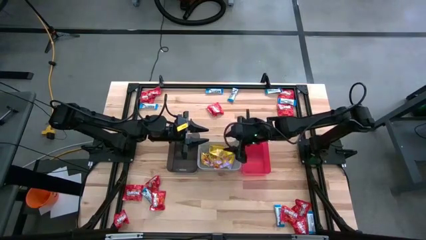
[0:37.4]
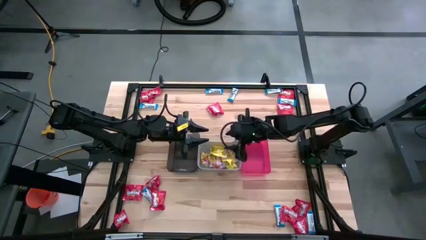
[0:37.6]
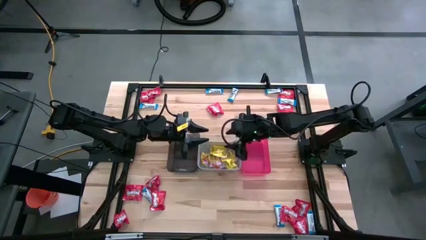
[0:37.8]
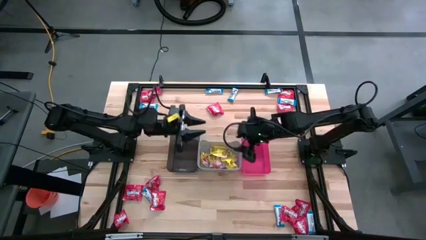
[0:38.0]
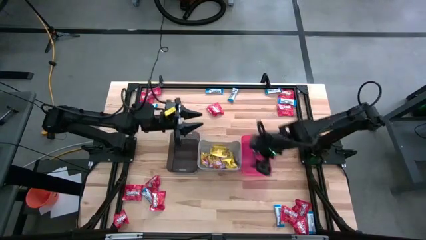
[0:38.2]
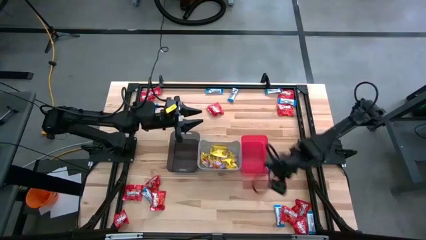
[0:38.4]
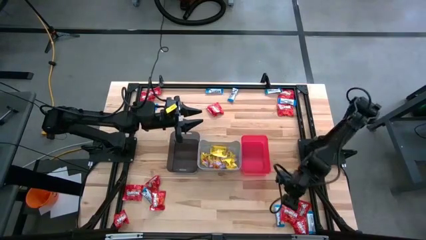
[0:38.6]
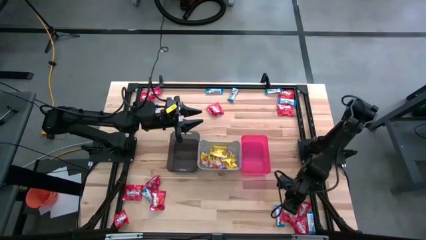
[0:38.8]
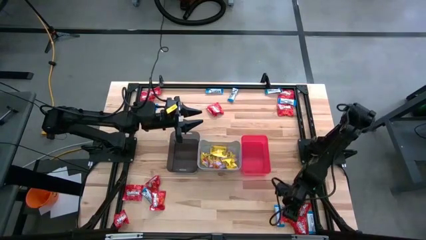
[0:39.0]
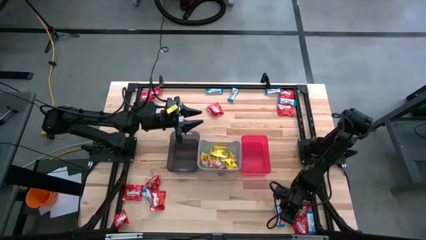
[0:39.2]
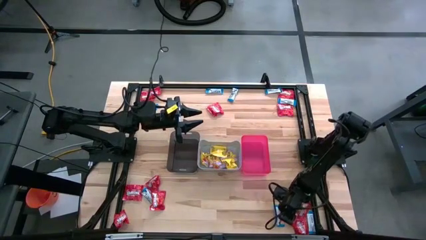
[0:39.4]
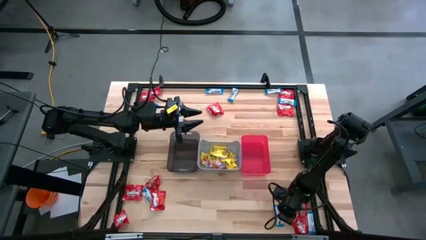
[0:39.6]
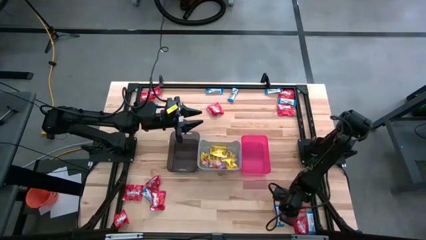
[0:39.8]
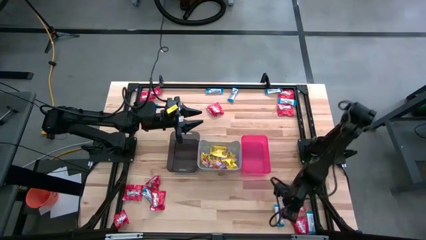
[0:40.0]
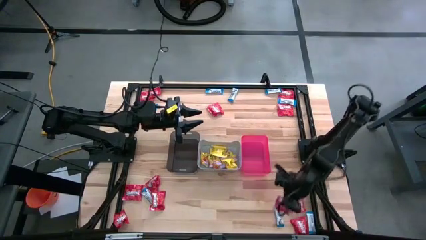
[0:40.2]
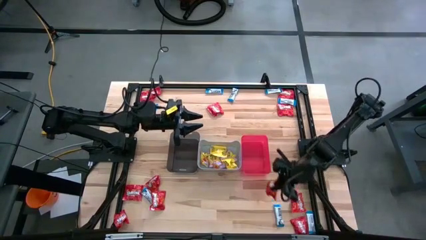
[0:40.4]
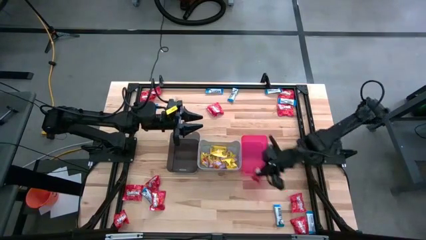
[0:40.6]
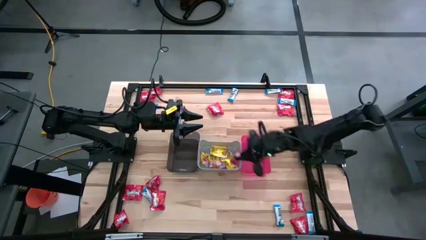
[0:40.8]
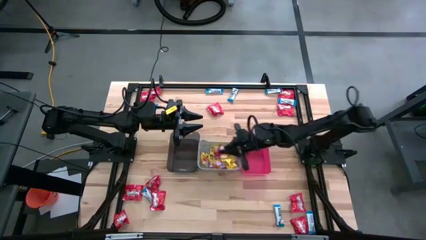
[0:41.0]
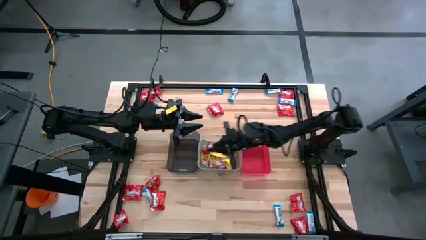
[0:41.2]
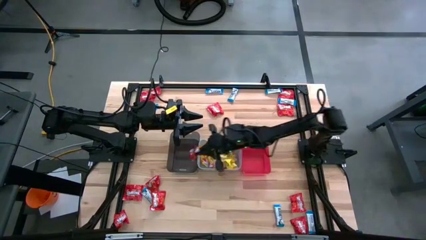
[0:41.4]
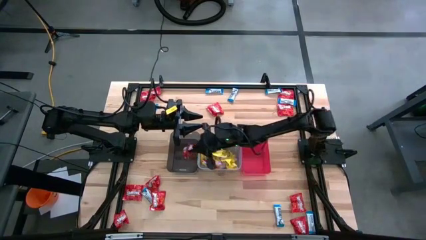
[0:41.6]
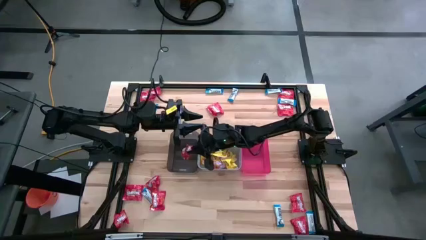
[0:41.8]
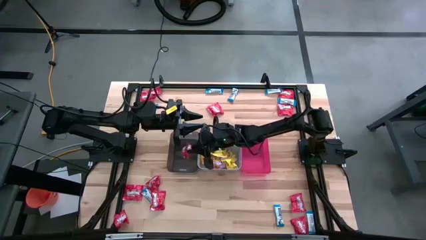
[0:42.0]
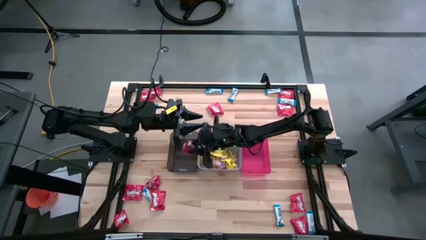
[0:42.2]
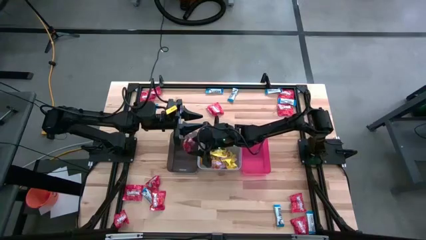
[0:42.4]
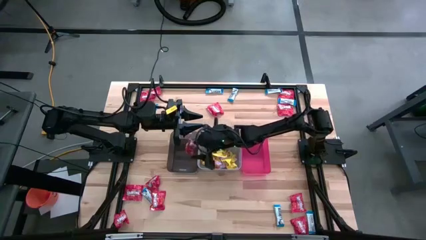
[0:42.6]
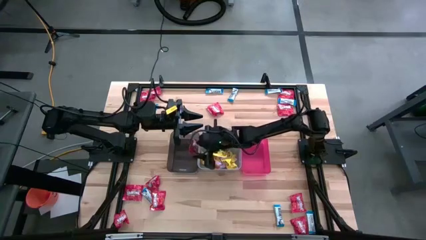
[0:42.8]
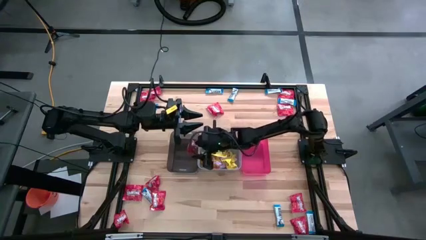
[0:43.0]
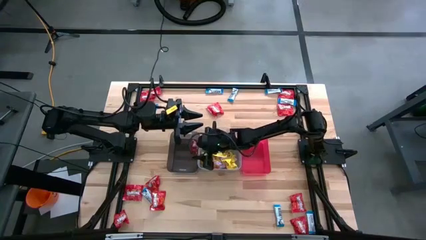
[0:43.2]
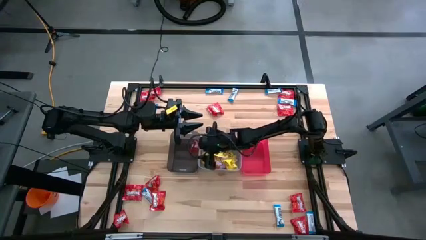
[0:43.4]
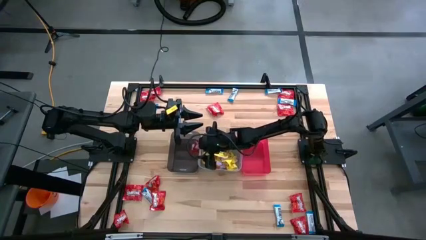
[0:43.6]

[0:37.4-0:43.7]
Task: Sort candy
Put the red candy into the black bin

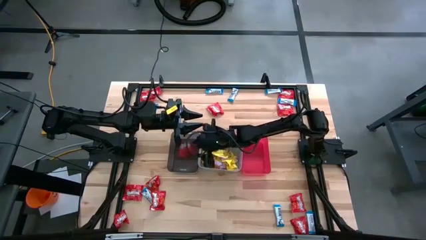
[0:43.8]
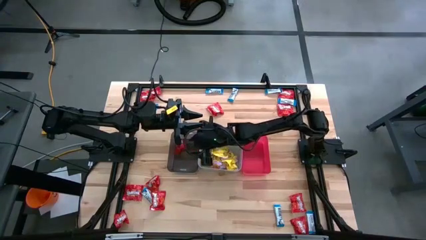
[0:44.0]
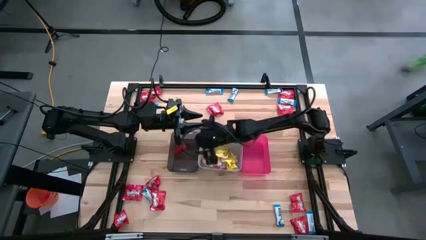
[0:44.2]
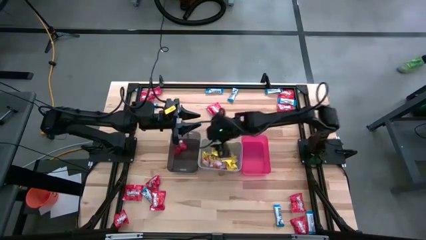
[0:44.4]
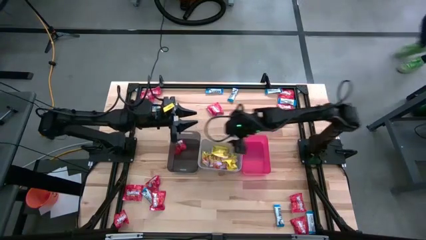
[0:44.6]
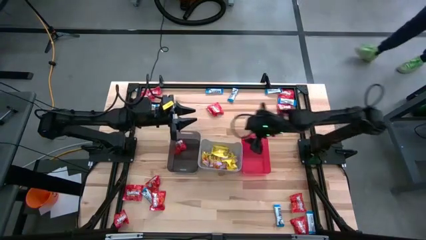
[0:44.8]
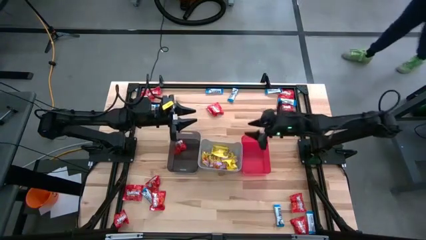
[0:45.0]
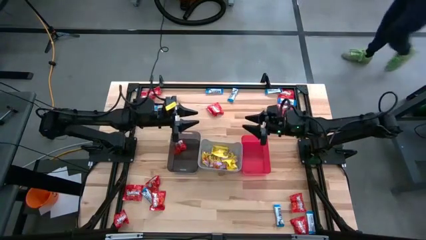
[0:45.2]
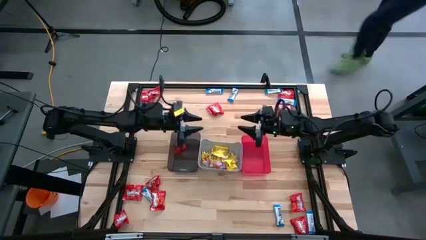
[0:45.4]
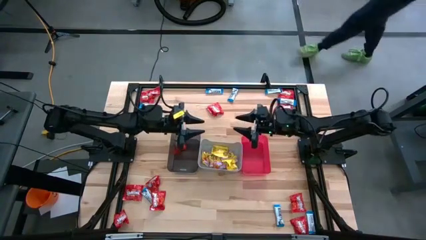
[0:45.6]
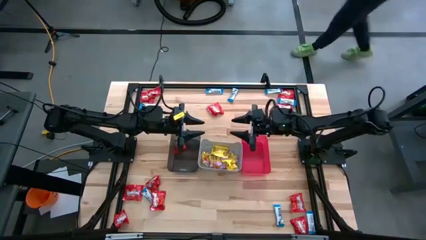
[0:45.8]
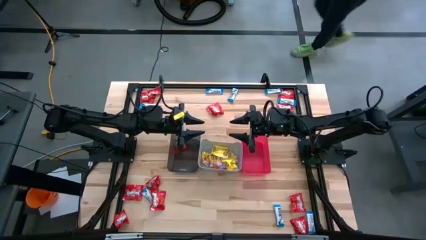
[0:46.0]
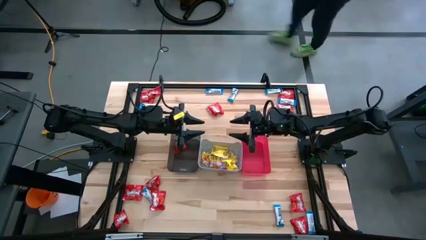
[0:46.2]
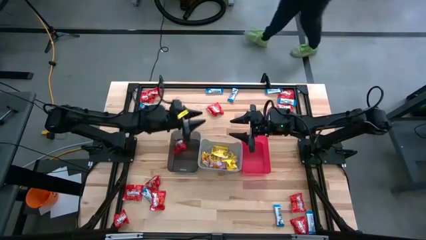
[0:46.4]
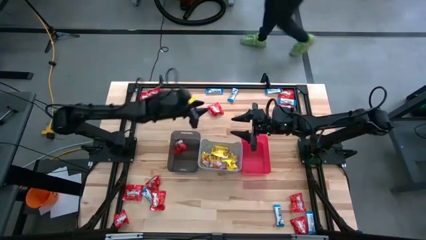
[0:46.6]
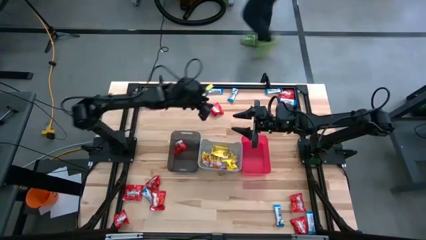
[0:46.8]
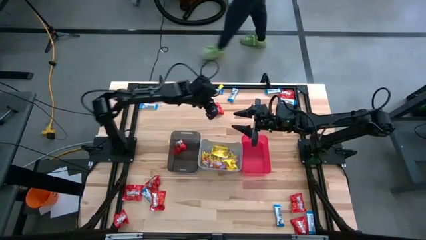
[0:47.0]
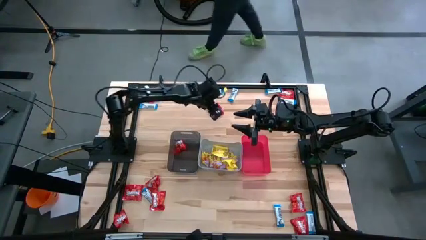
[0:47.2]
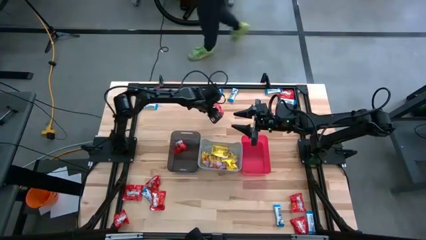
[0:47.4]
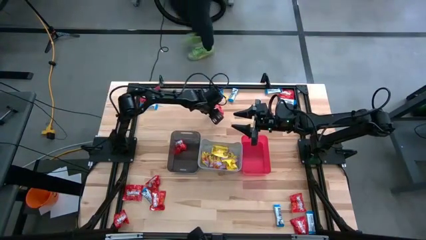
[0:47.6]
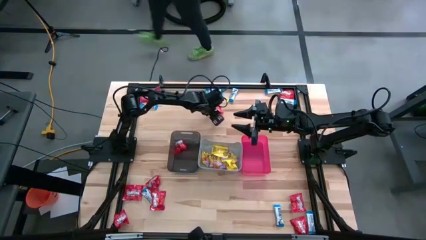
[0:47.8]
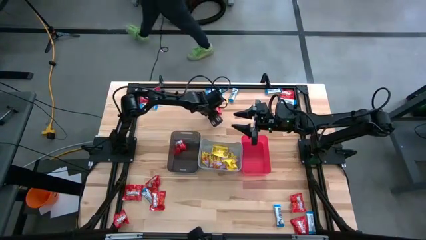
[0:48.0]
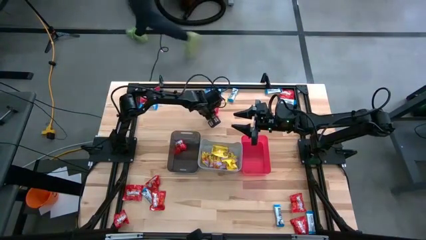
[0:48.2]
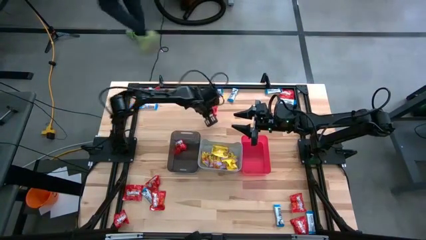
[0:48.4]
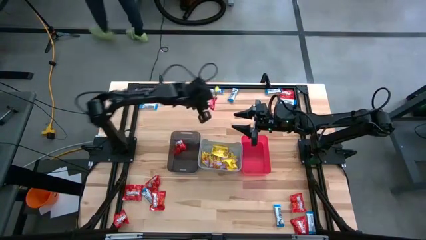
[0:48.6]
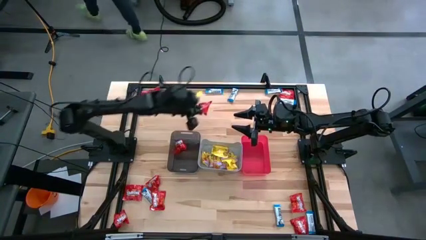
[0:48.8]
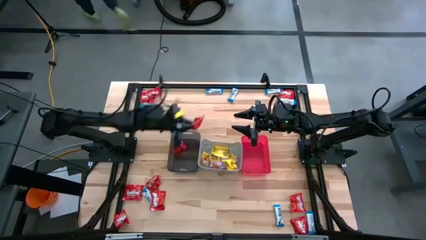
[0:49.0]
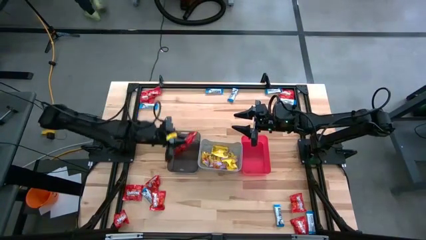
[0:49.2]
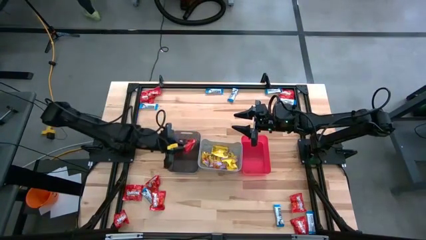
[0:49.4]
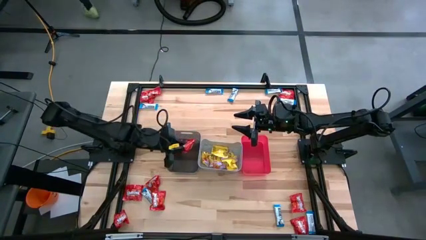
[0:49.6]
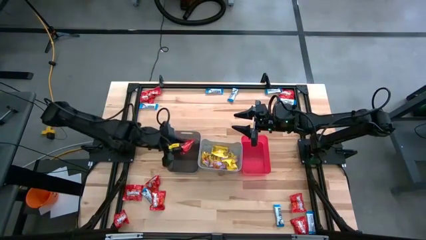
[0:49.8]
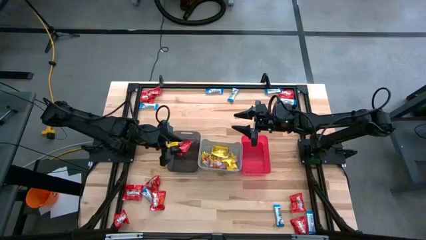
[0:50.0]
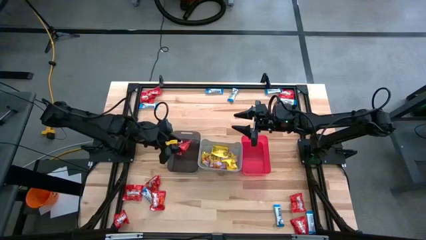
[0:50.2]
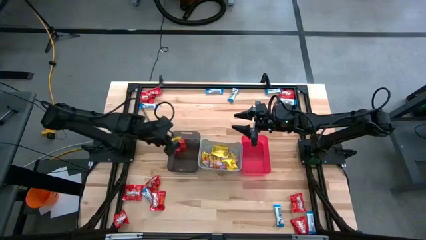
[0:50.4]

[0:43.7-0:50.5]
Put the red candy into the black bin

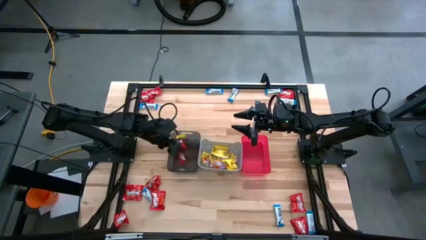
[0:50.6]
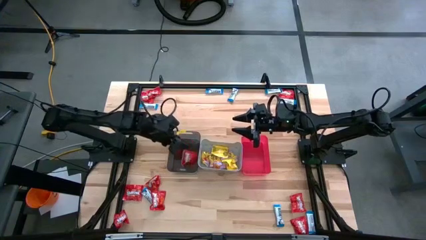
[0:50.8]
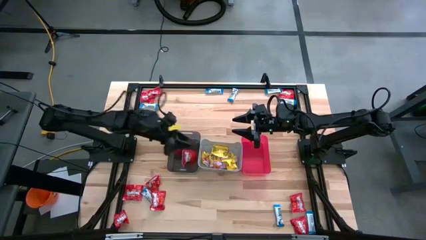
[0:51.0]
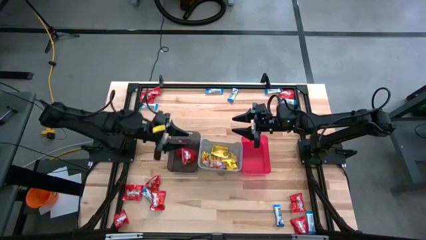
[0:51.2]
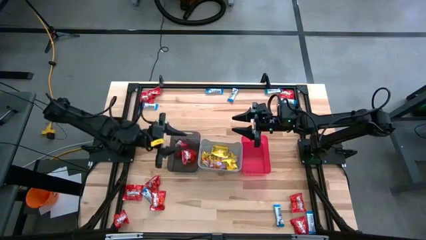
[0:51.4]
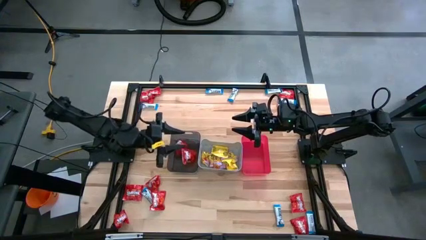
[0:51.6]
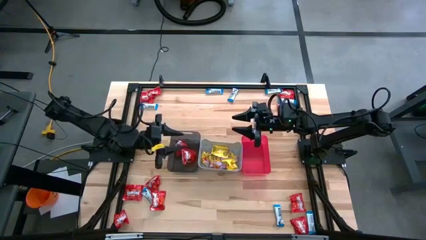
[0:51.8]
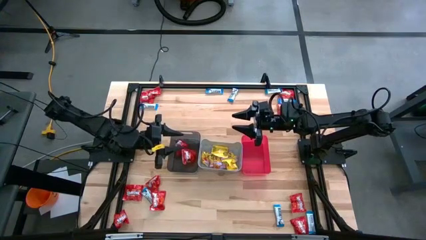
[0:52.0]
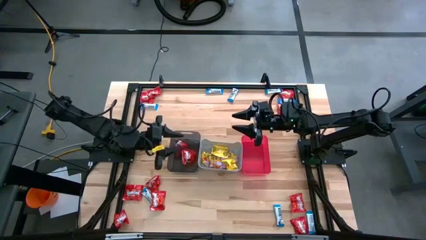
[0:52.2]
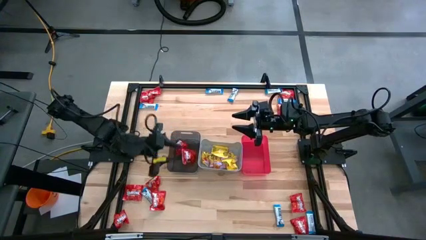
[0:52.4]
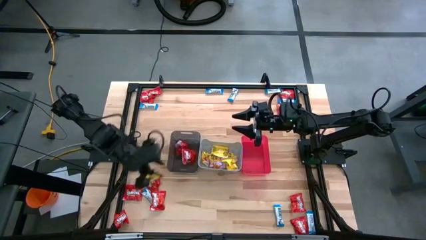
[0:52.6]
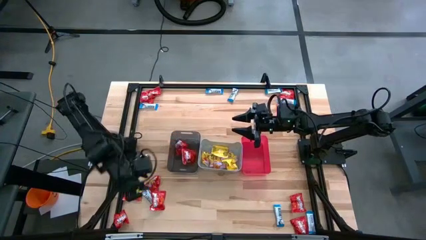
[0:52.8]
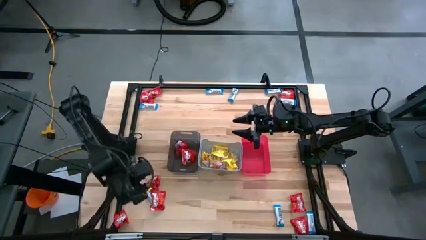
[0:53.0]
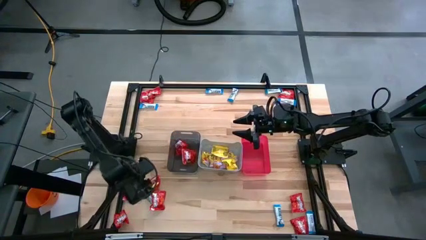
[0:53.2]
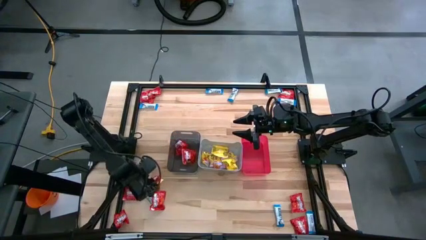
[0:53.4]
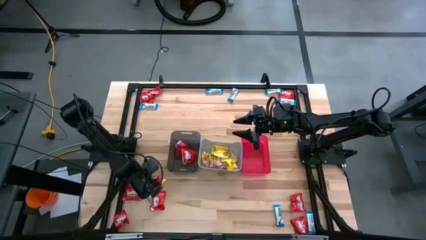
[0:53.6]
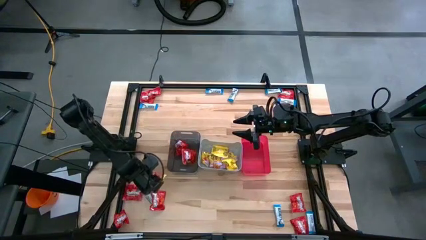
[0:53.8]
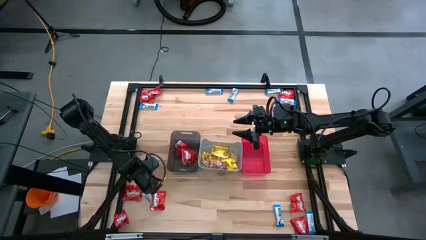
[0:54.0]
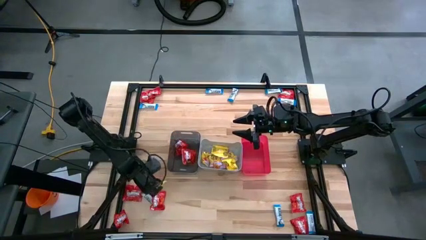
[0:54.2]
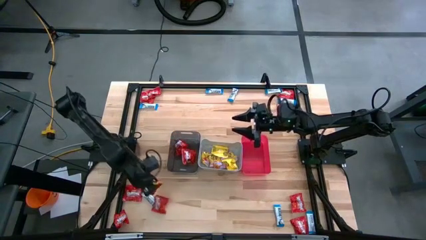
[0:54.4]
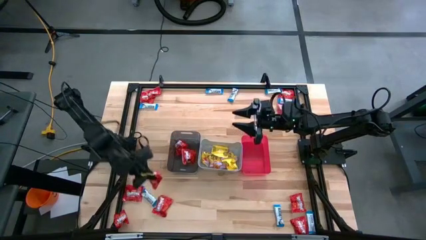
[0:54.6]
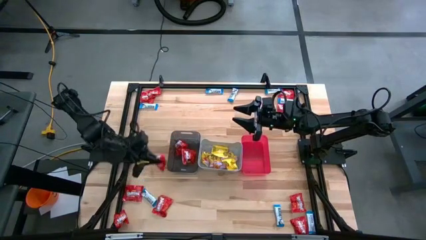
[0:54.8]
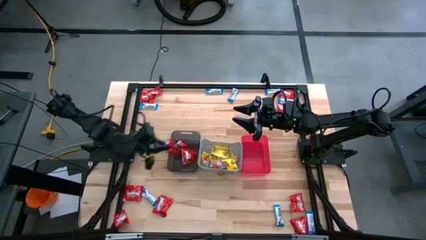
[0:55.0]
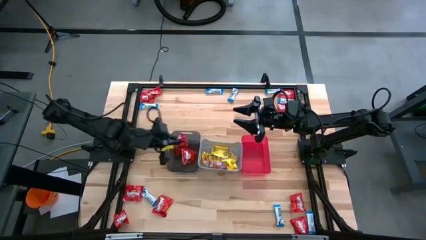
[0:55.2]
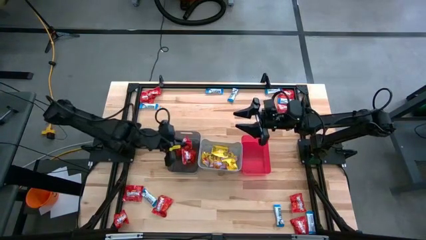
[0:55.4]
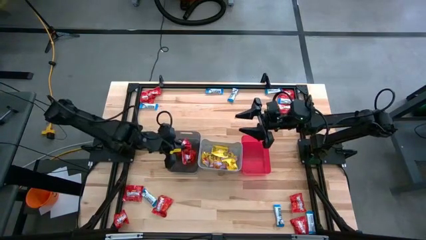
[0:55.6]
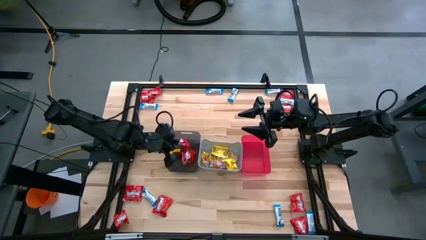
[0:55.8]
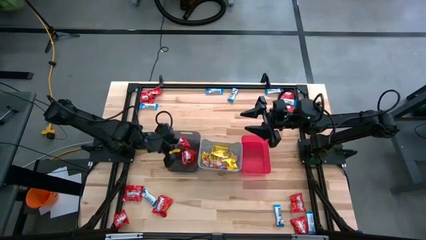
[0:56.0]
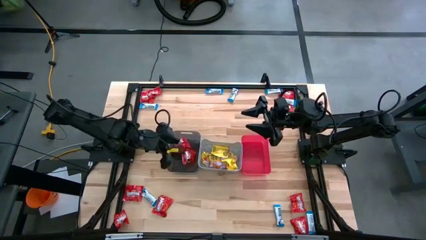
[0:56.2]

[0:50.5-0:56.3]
Put the red candy into the black bin
